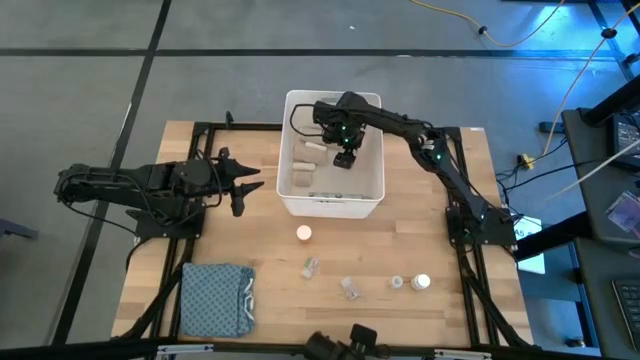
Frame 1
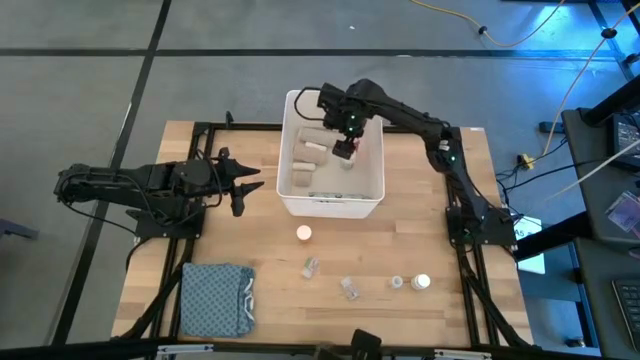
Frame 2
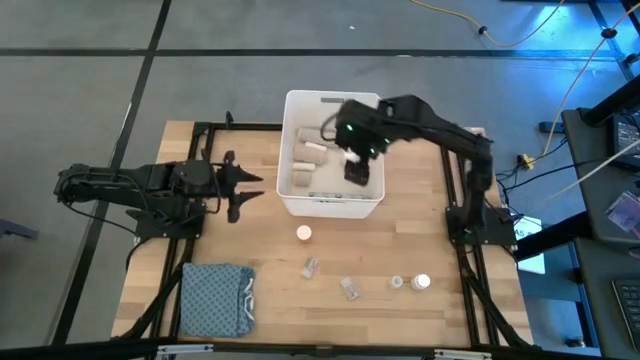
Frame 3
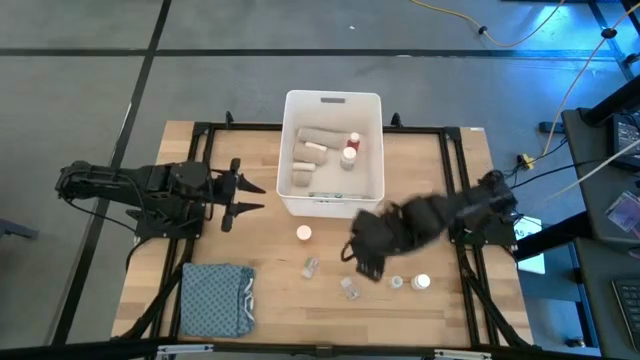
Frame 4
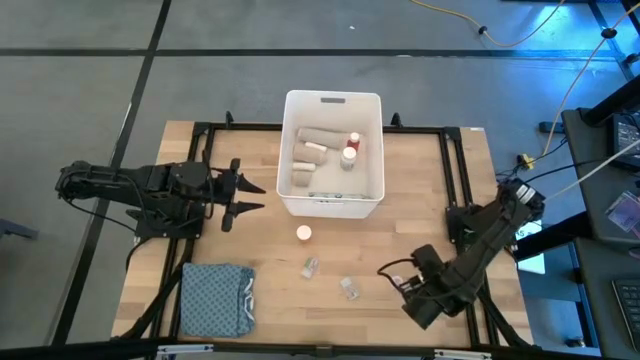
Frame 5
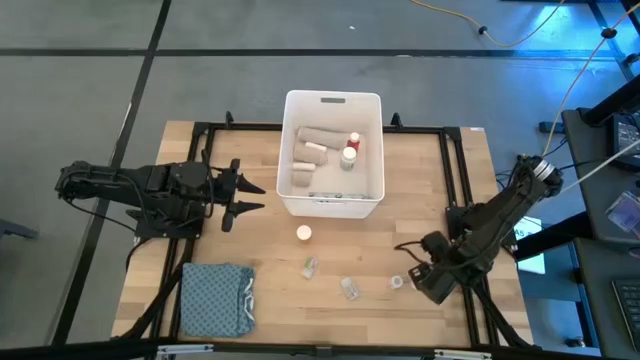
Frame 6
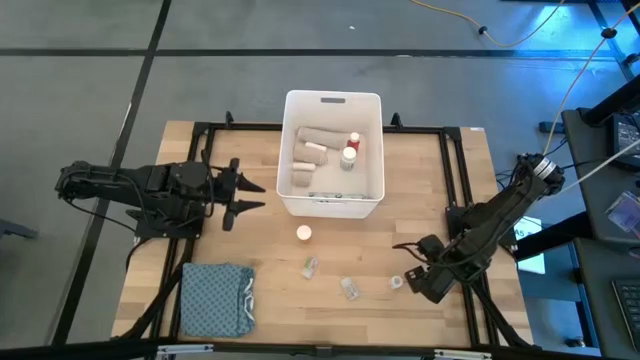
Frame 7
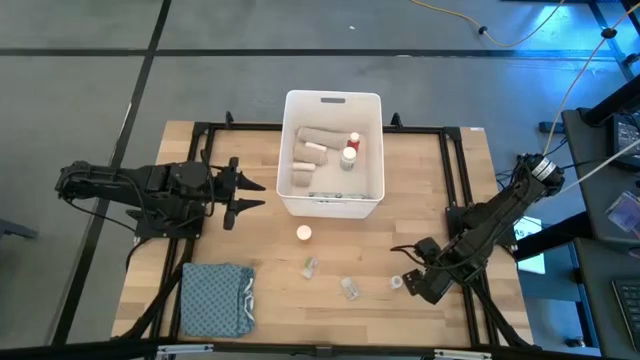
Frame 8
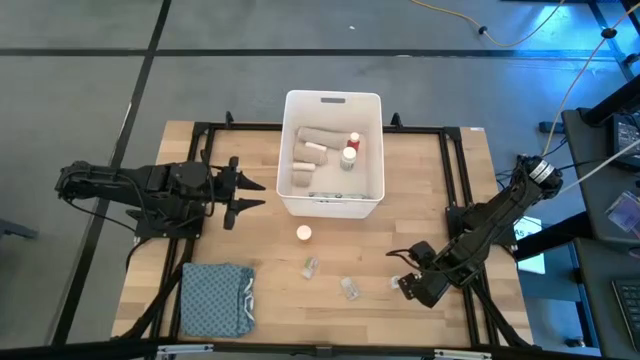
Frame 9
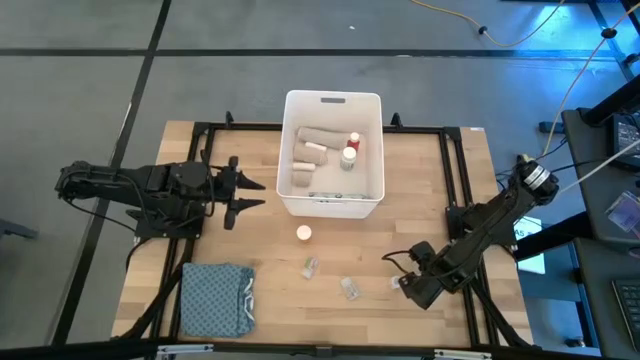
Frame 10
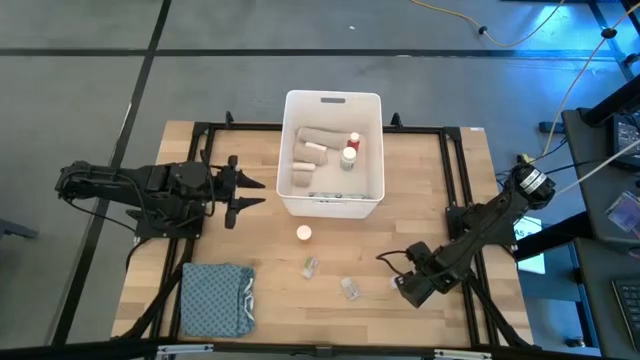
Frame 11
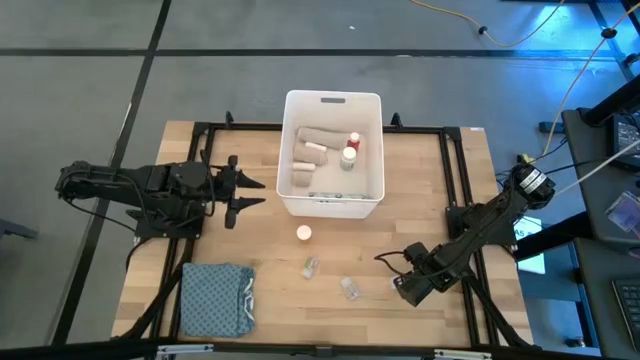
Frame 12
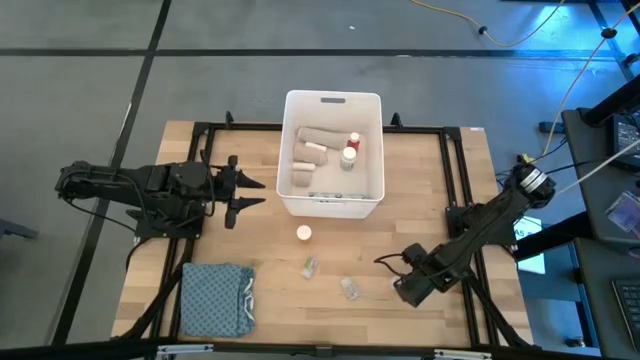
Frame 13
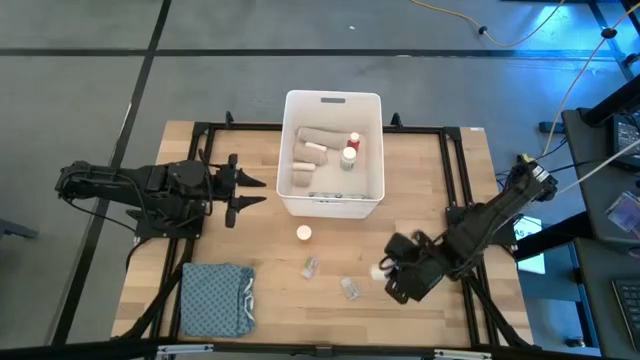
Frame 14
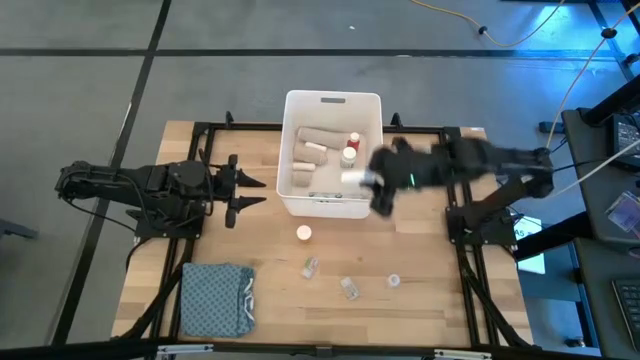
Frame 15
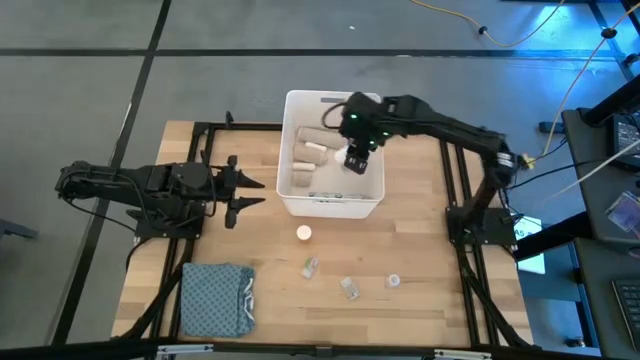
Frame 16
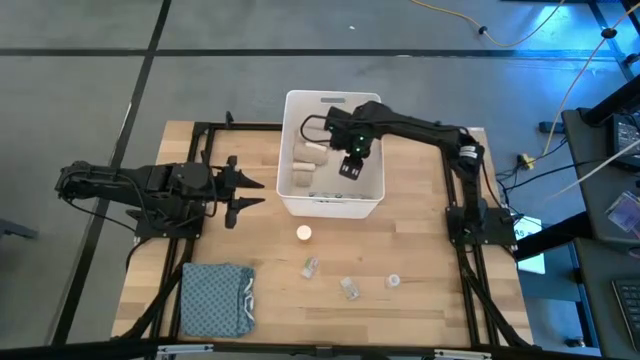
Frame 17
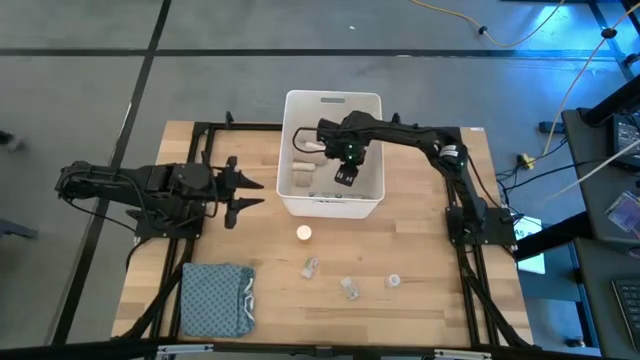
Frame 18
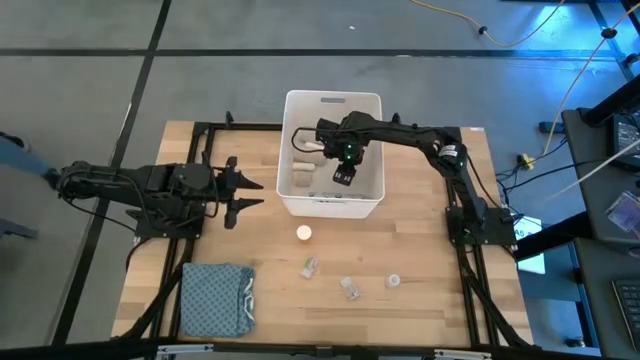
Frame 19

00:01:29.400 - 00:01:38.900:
Task: Pick & place medical supplies in basket/bin
Put the small white pill bottle into the white bin

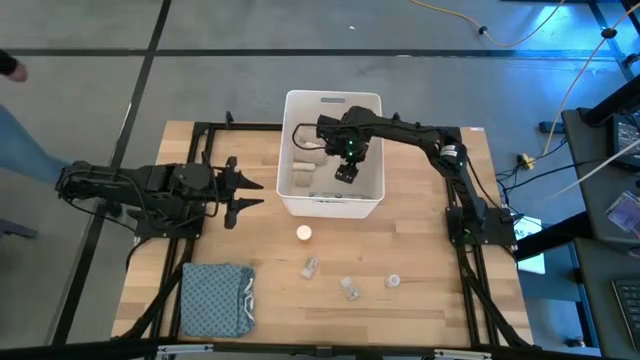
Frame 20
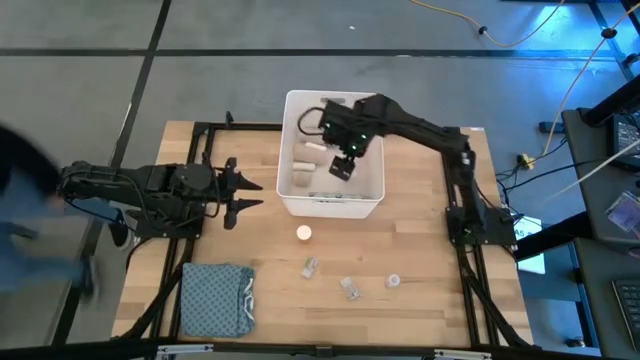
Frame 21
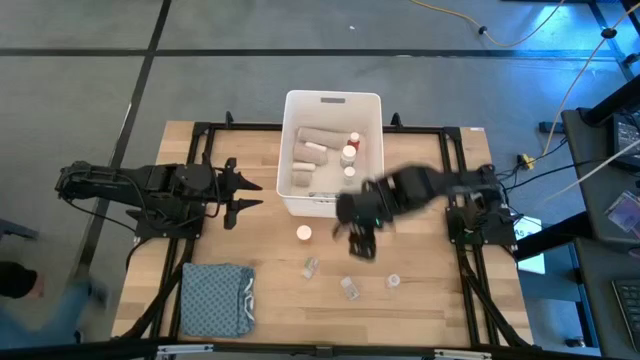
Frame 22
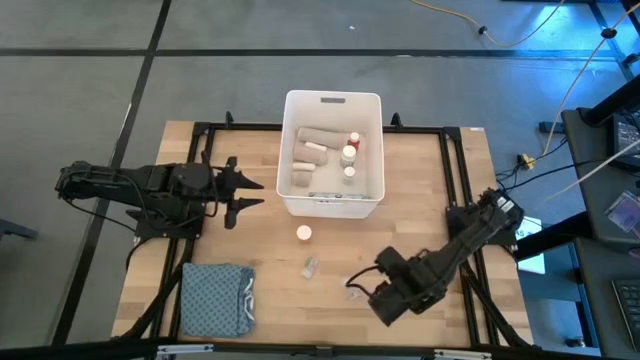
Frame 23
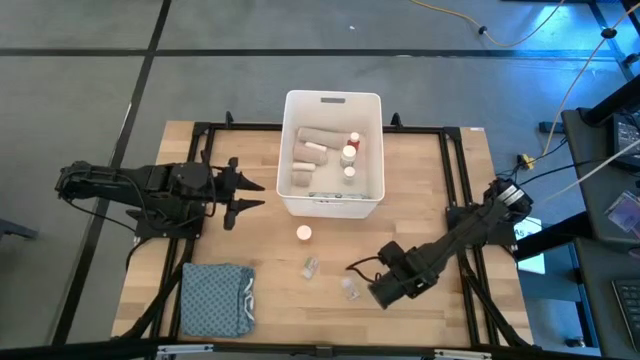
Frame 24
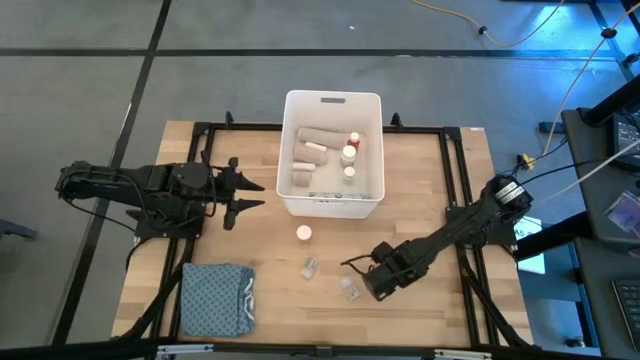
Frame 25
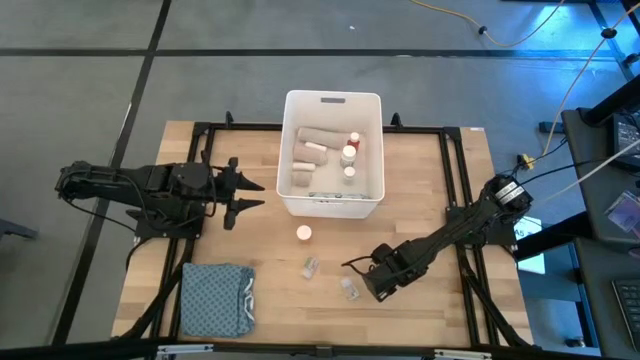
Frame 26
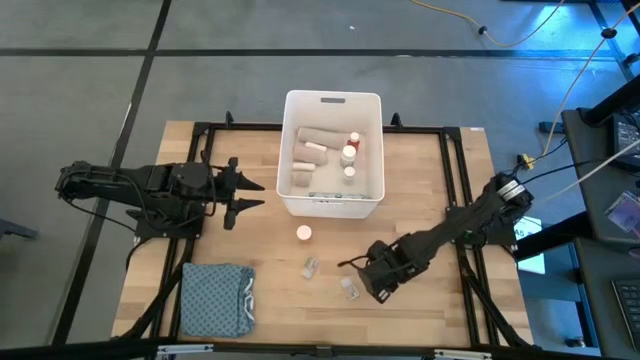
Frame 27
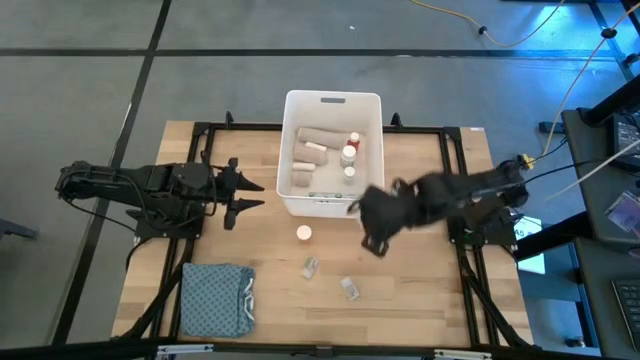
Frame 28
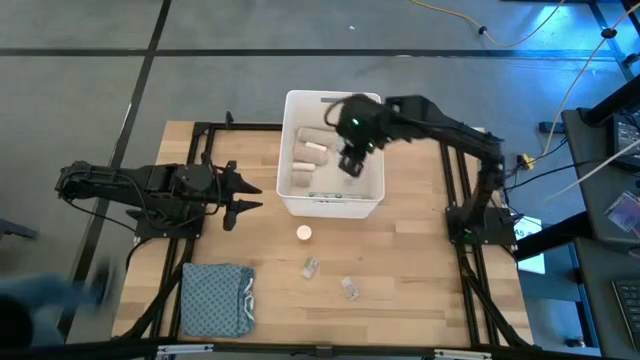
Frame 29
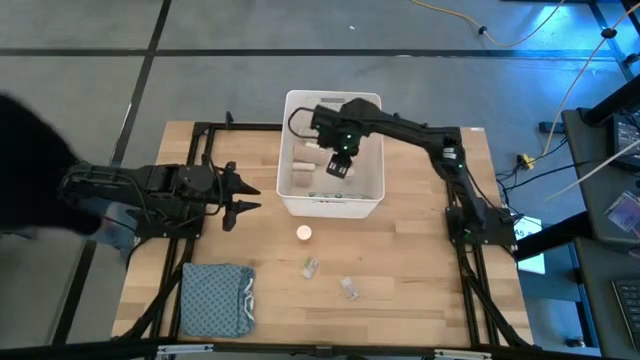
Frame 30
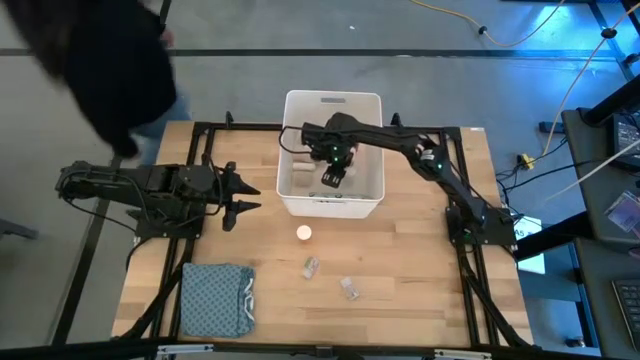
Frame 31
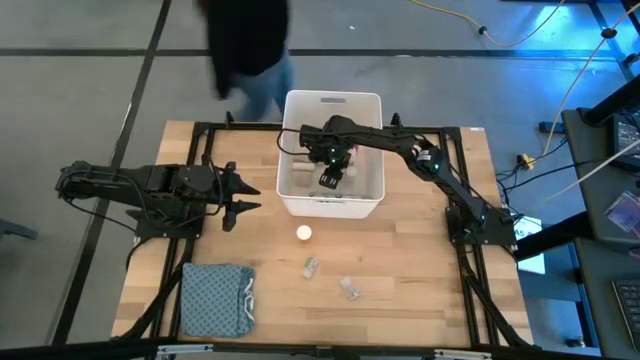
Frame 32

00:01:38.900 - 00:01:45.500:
Put the right transparent pill bottle into the white bin

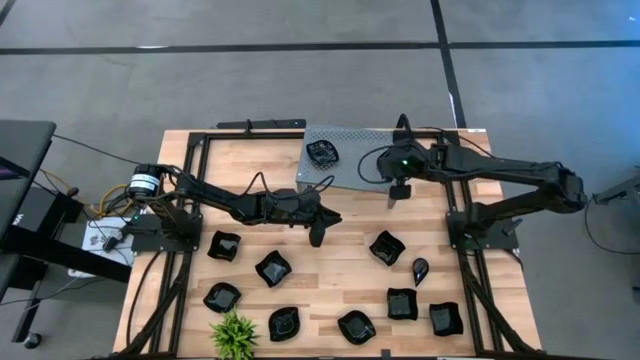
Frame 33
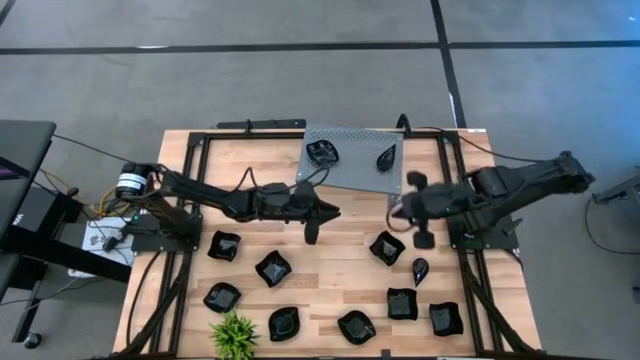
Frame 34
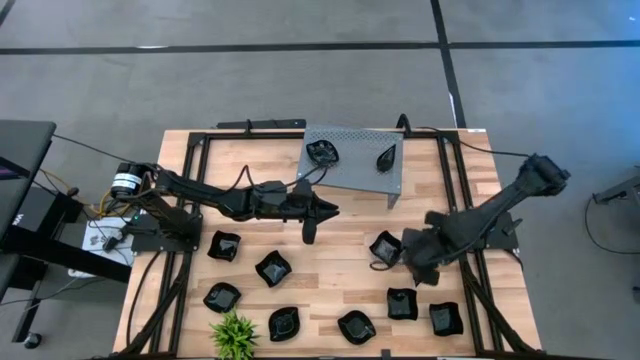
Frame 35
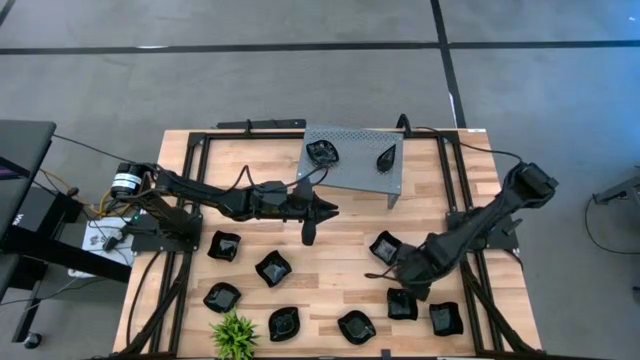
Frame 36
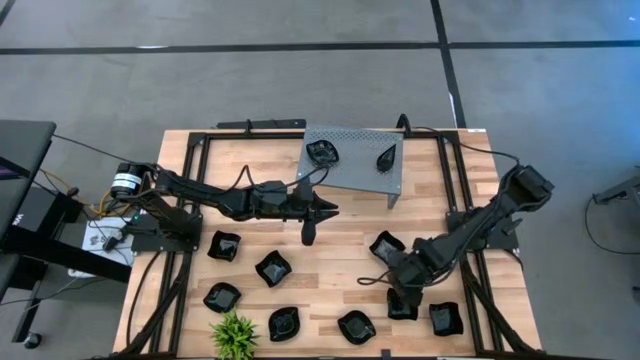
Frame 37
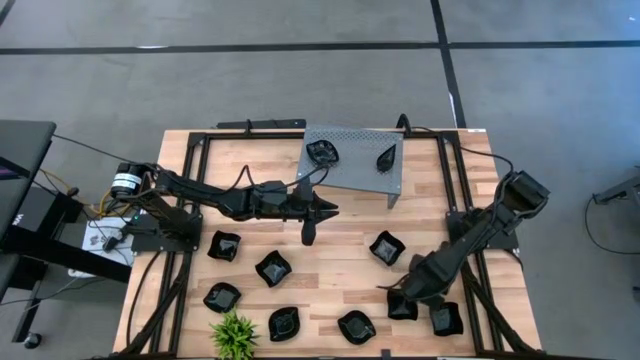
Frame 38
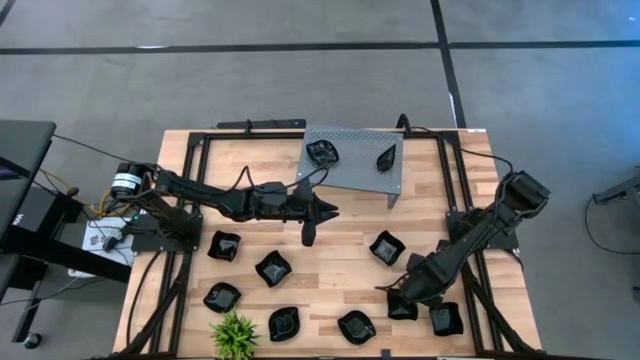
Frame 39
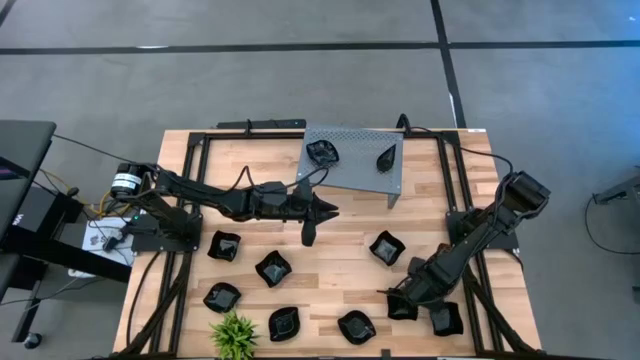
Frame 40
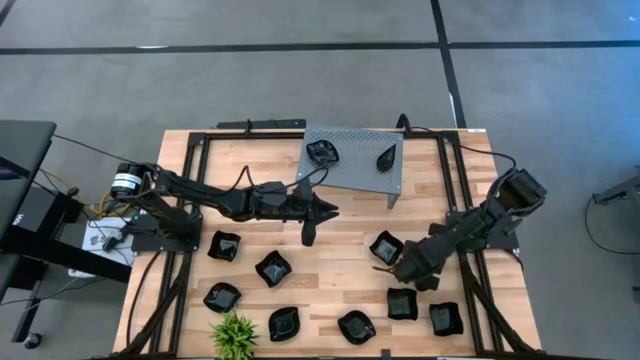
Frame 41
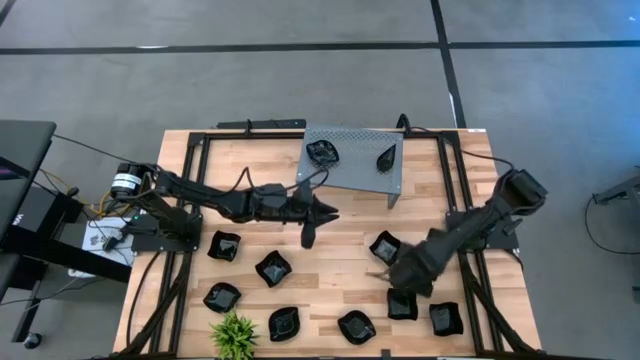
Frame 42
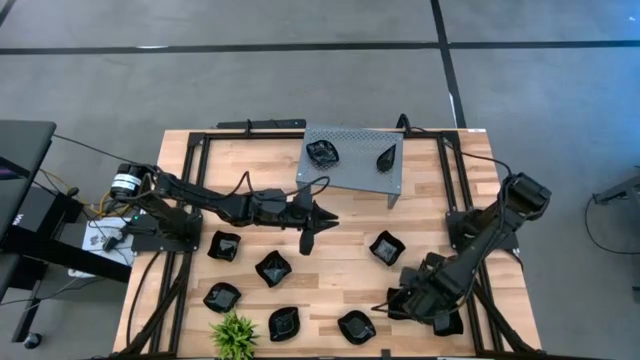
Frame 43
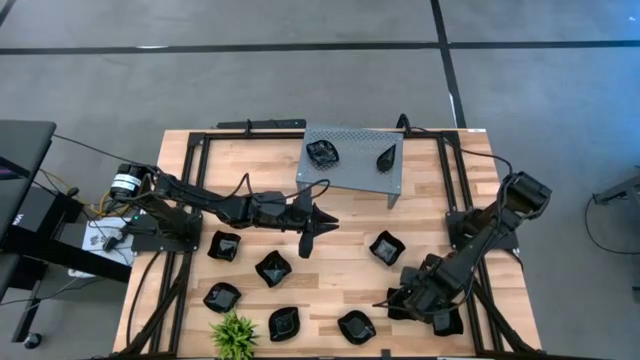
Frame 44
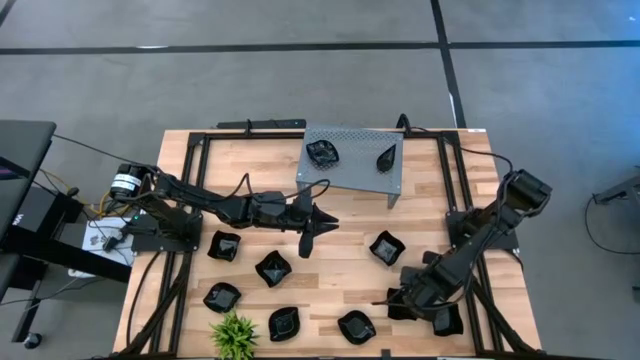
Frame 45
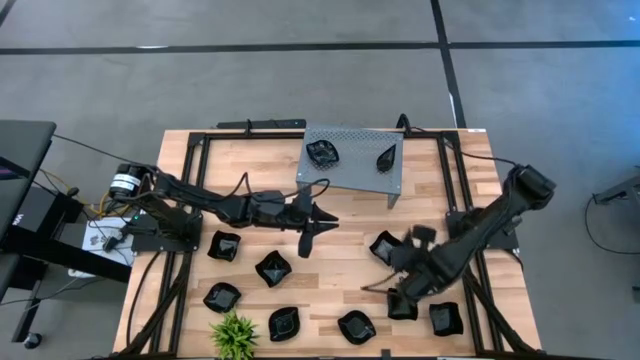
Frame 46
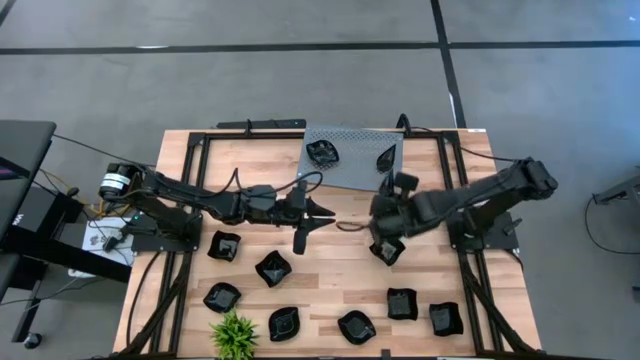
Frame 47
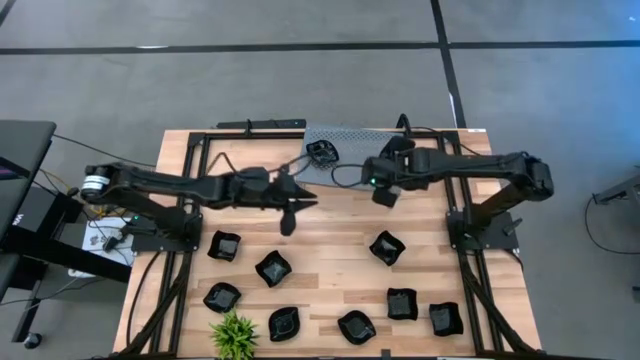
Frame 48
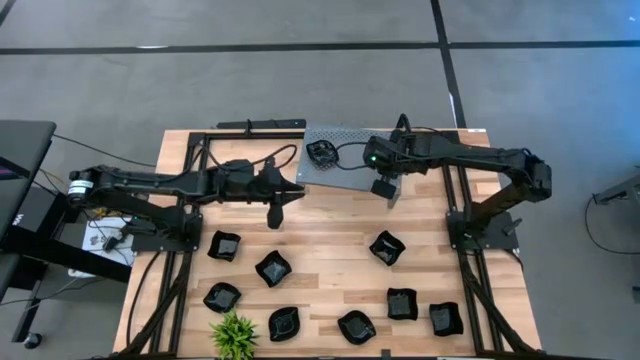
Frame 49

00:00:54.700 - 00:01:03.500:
Task: Pick & Place Mini shaped plates
Stack the black drop-shaped plate on the other drop-shaped plates on the shelf
